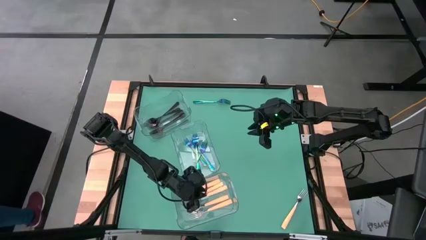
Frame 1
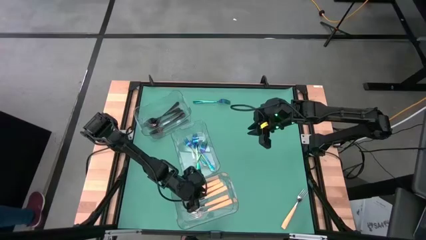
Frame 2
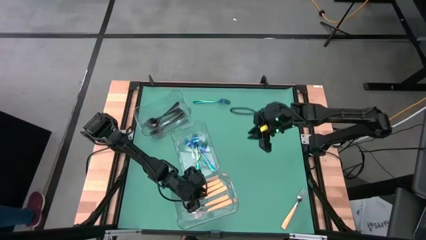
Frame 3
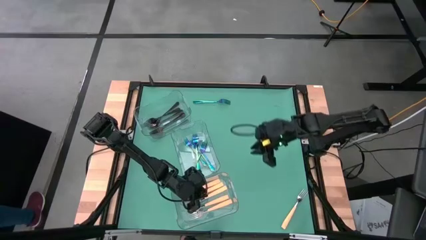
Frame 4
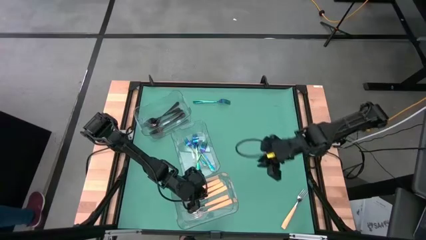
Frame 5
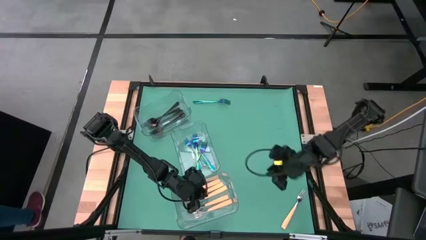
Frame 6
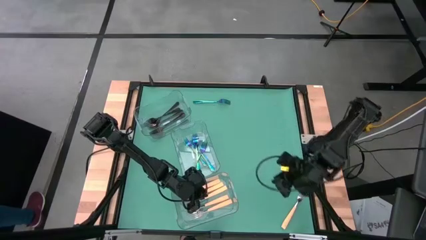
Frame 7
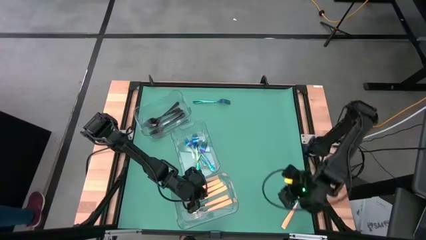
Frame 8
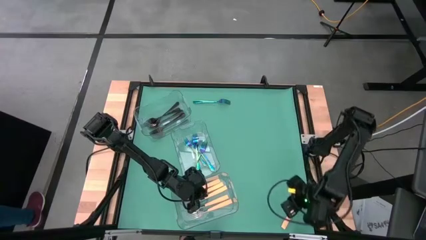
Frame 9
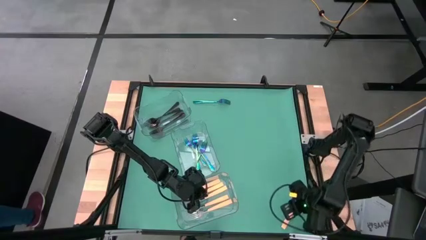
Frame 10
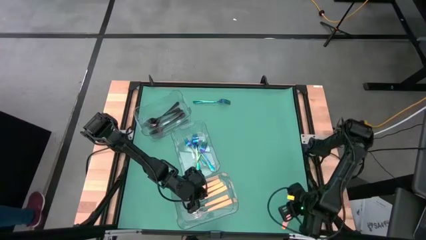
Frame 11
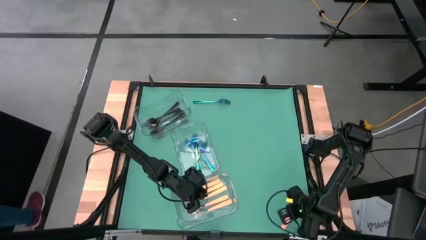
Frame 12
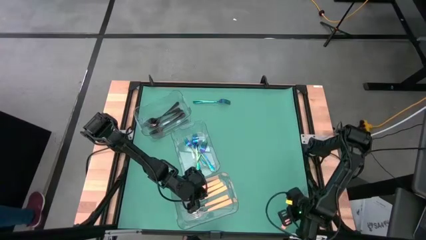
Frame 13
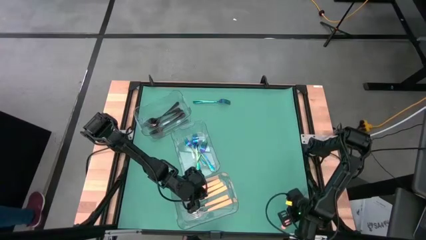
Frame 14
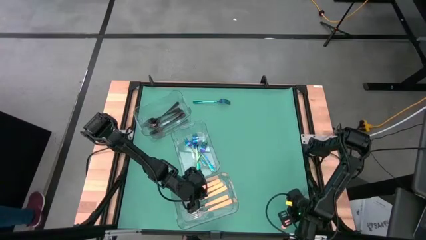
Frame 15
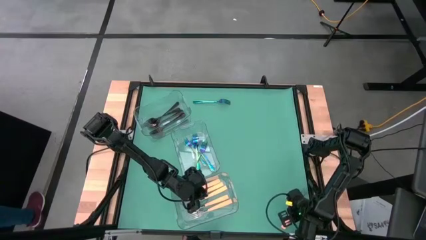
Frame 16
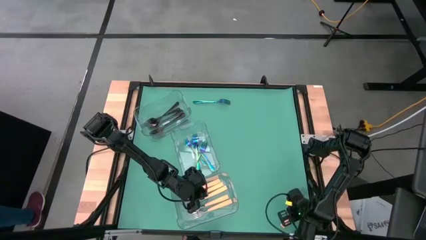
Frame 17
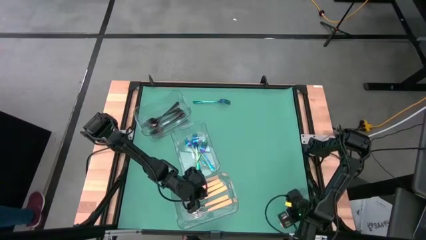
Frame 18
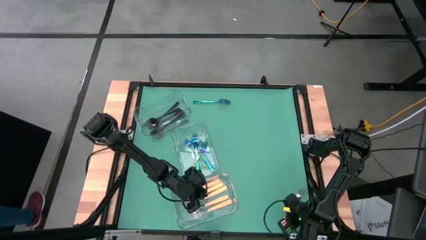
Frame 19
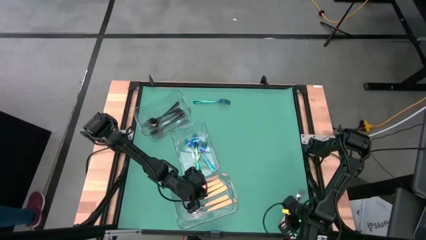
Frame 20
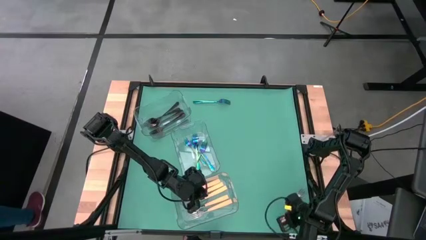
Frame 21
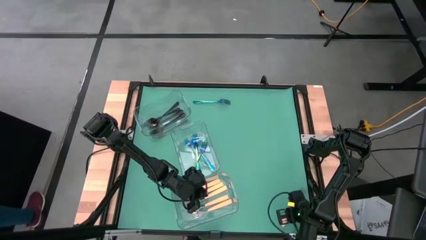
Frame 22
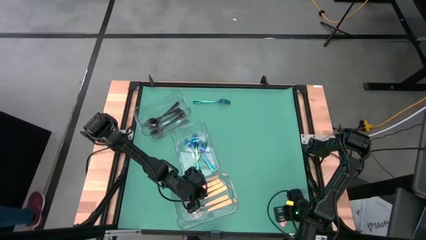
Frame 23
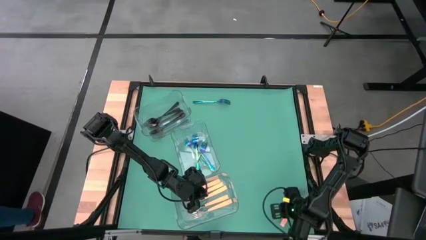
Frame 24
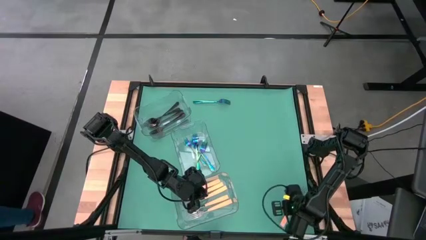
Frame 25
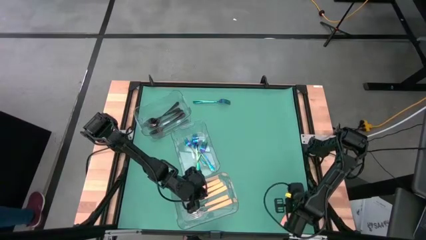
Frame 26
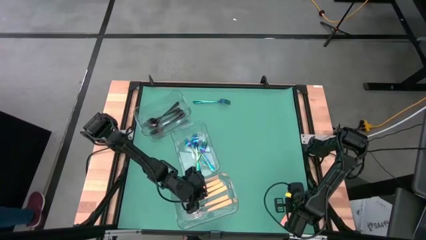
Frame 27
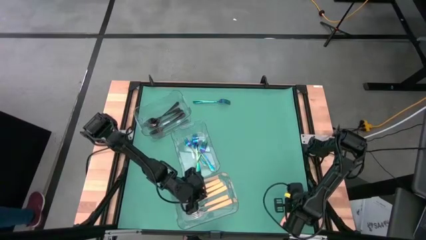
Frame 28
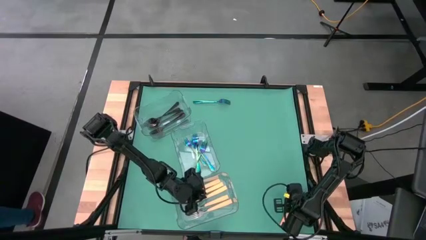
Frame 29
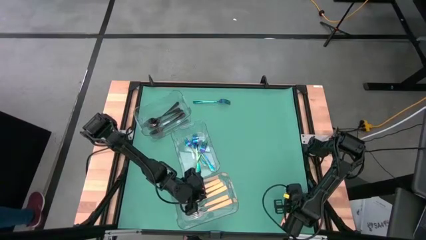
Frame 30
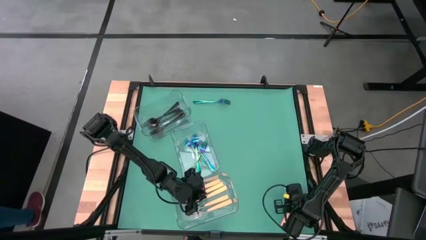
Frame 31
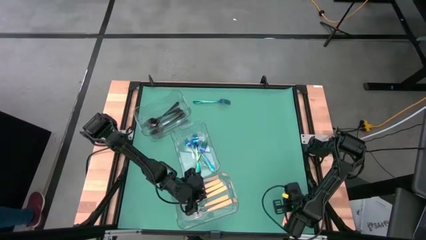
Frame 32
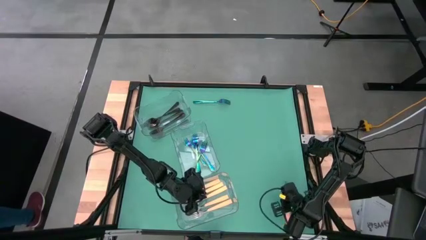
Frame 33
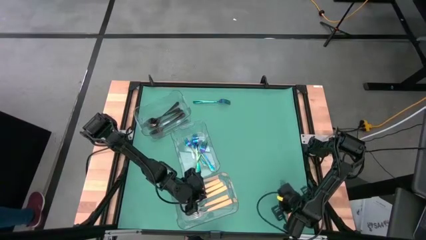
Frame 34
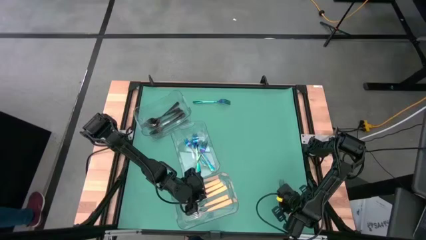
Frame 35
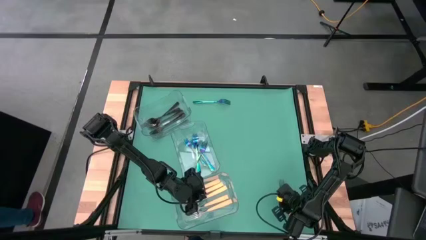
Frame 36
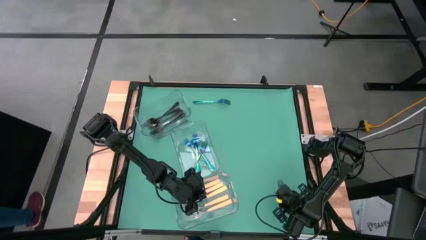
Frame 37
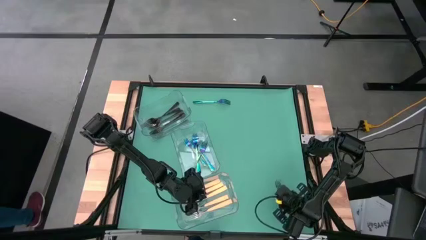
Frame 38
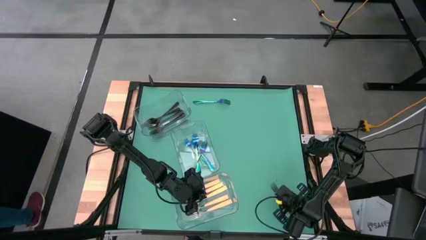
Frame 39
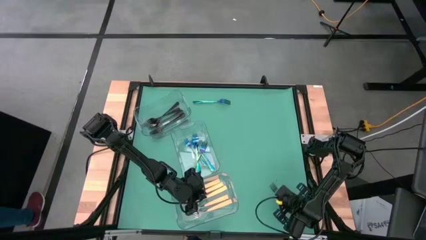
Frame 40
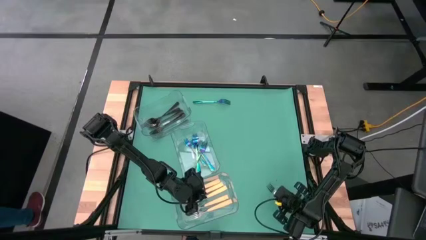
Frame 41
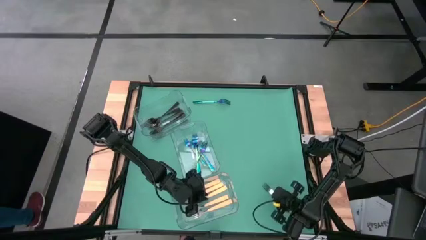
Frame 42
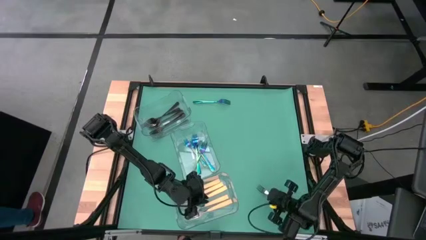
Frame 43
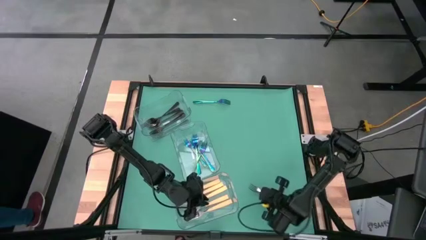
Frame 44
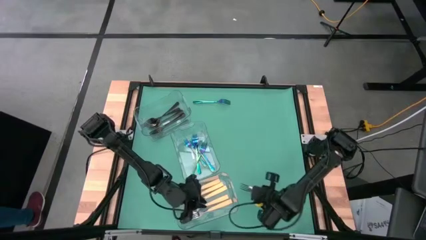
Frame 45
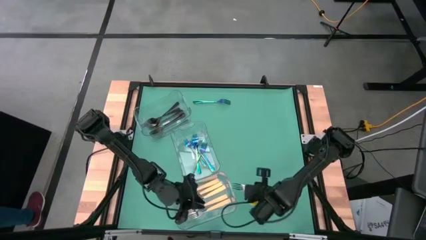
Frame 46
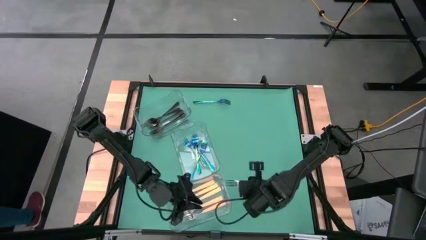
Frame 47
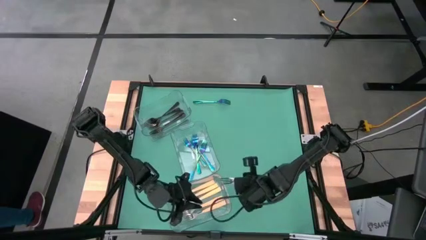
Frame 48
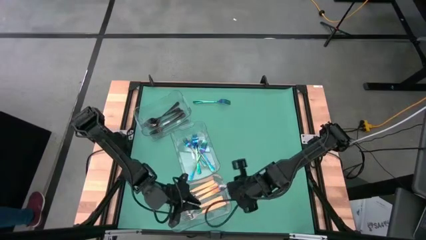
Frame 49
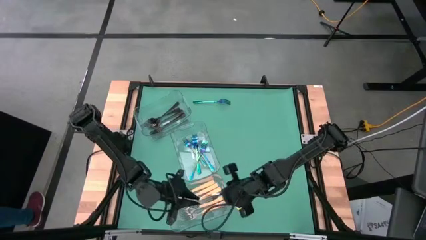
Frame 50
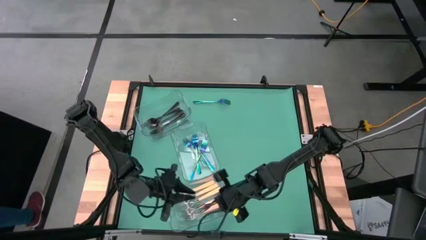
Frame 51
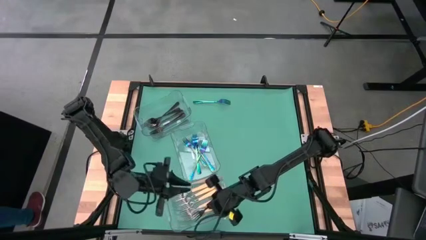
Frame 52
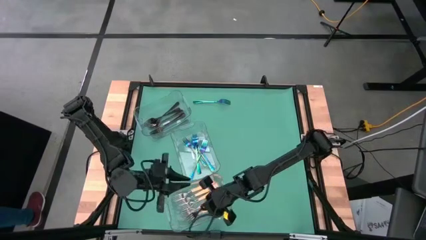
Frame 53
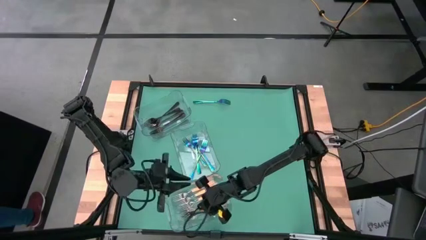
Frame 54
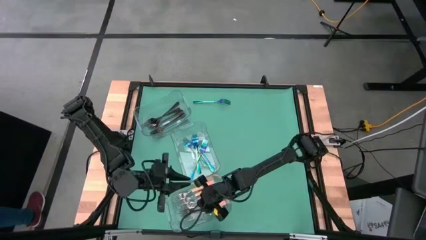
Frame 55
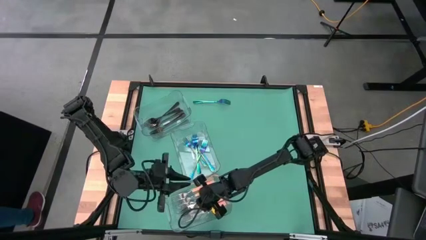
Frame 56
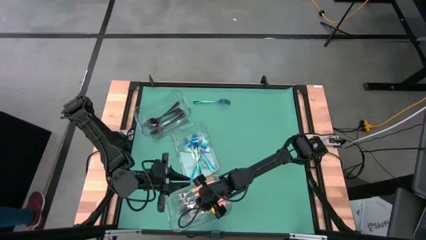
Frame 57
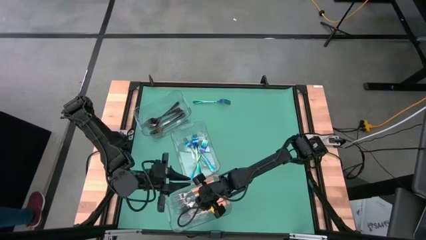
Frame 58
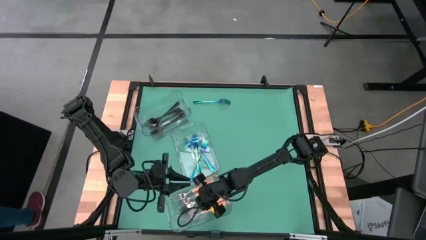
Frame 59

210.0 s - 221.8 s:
Task: Sort silverware by color (type)
Put the yellow fork into the bottom transparent bin

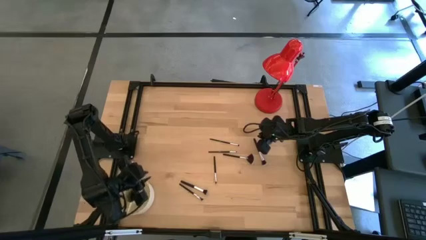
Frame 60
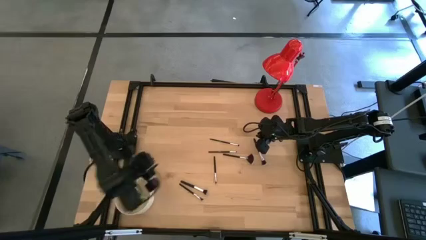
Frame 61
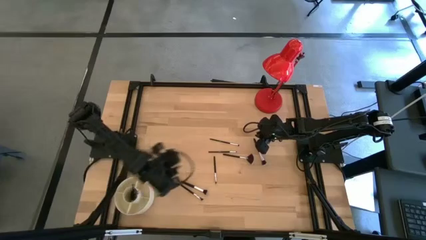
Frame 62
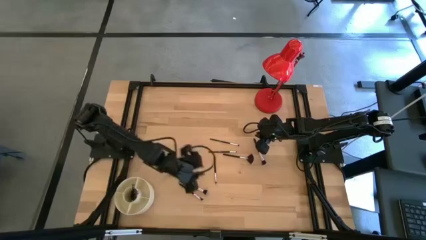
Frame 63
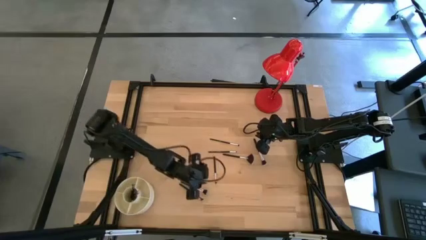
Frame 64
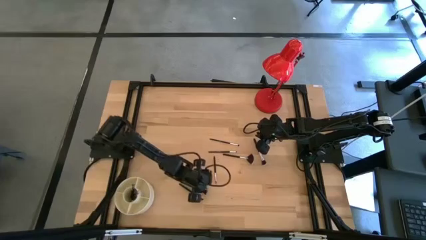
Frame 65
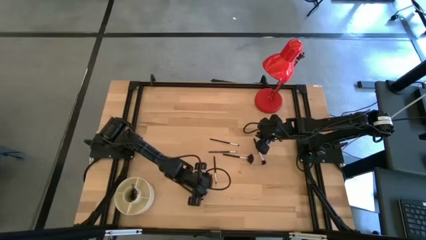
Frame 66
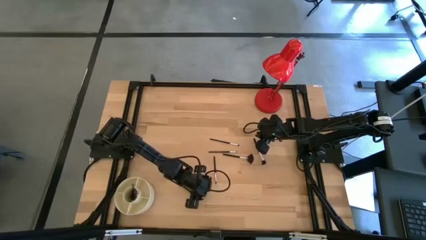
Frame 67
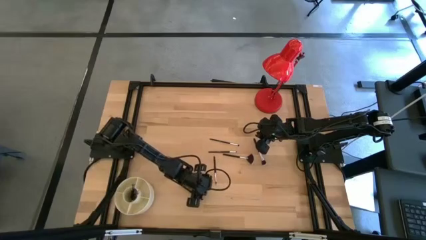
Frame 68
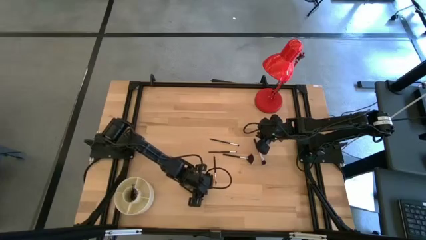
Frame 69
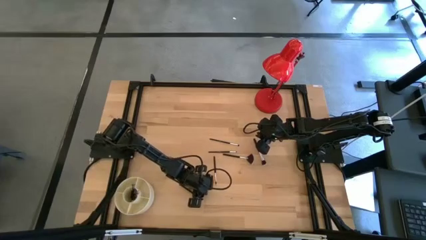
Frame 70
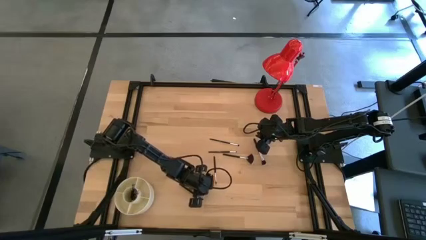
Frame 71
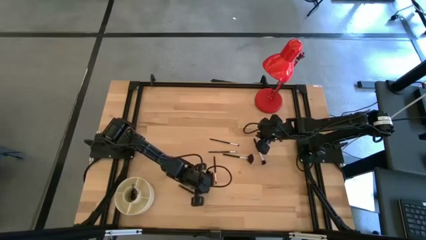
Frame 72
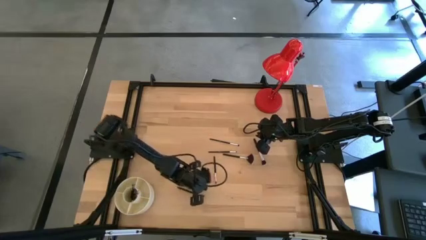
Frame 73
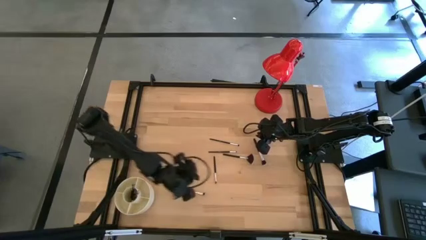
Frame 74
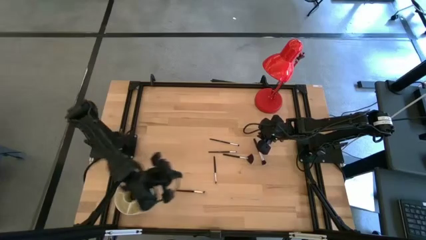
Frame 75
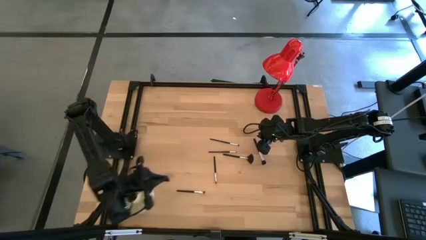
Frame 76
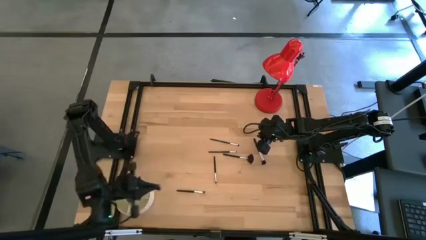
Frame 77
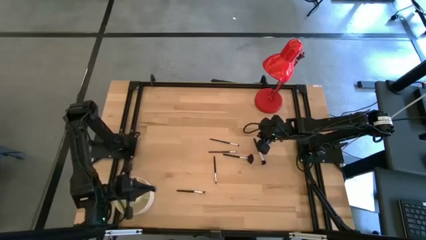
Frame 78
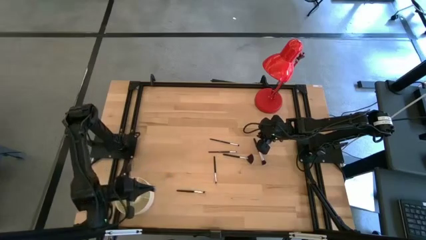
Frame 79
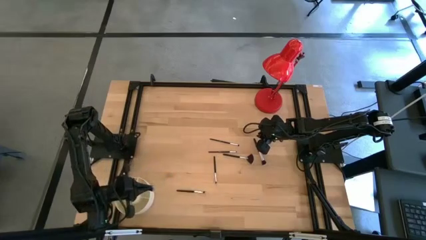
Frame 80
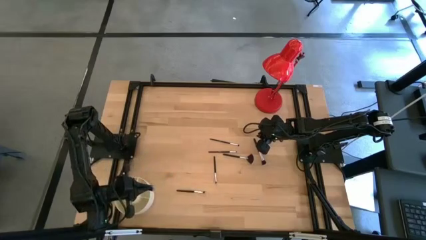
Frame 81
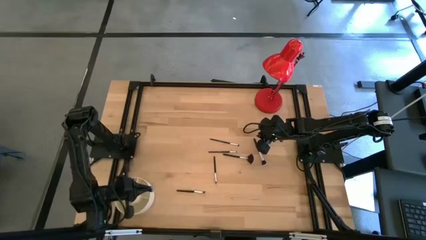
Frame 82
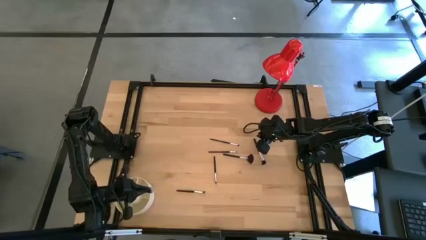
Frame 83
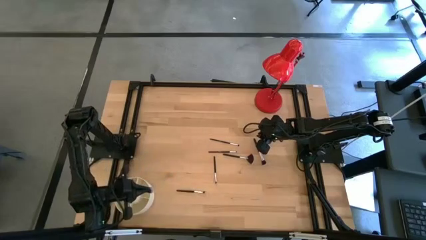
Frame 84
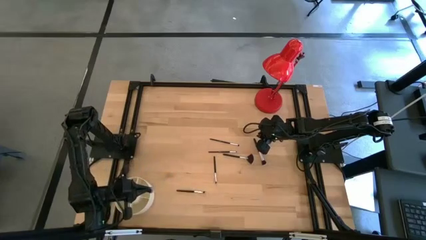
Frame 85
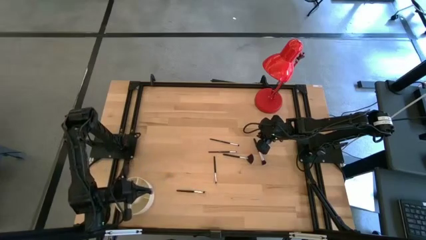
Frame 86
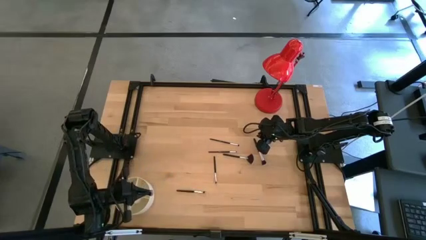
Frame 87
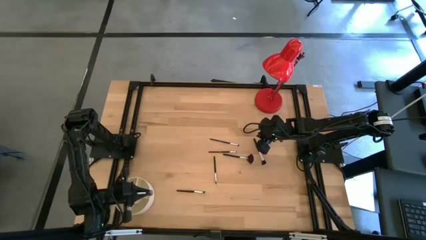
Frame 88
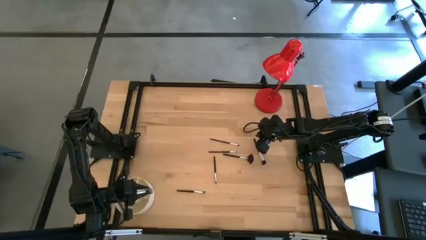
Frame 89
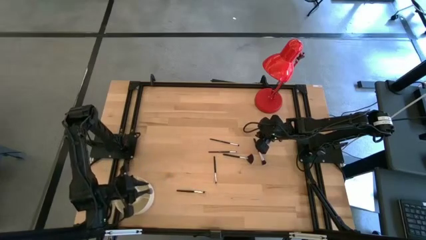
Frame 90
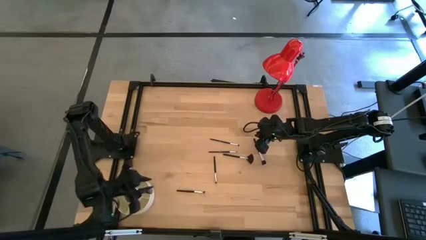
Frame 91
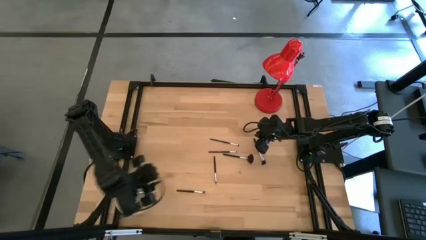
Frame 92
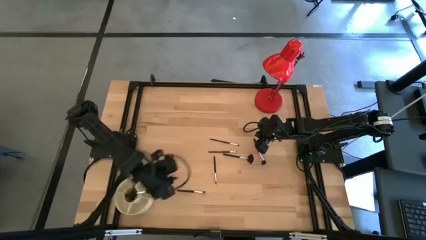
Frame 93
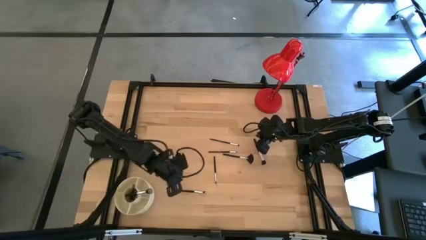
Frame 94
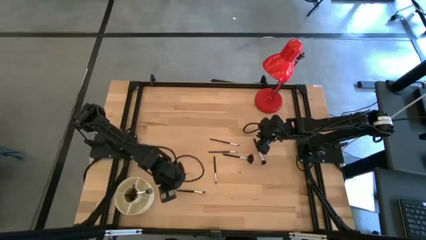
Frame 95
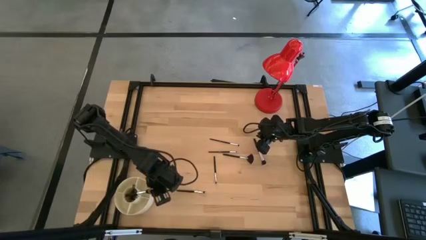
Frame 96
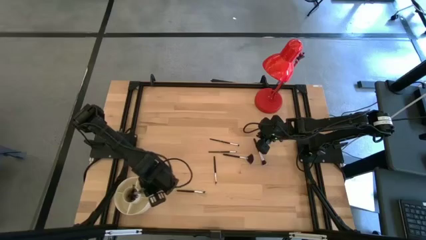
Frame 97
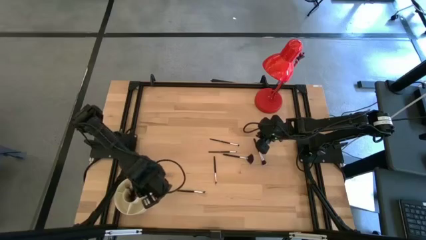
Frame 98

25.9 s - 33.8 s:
Task: Pick & Place Makeup Brushes
Put the black blush brush into the makeup organizer
